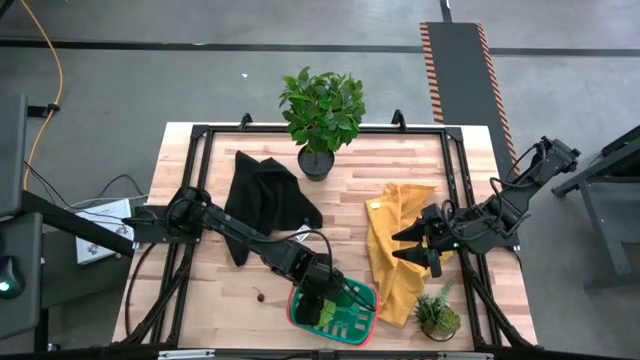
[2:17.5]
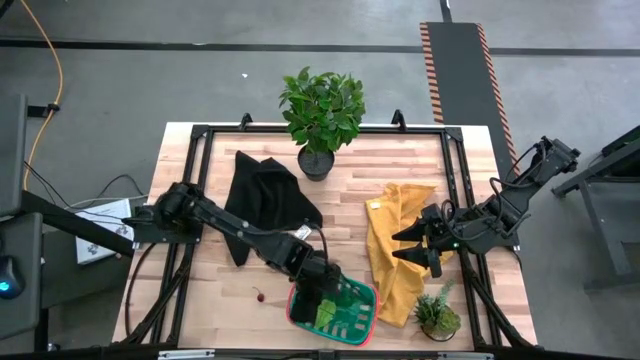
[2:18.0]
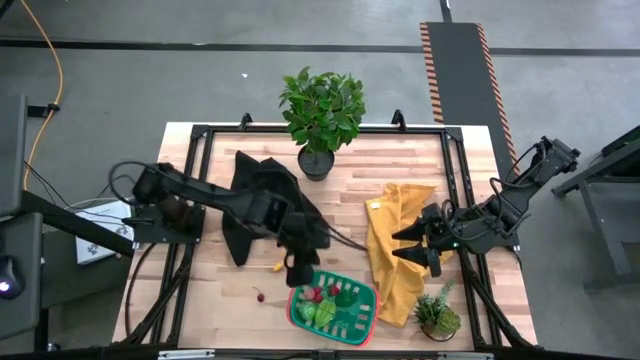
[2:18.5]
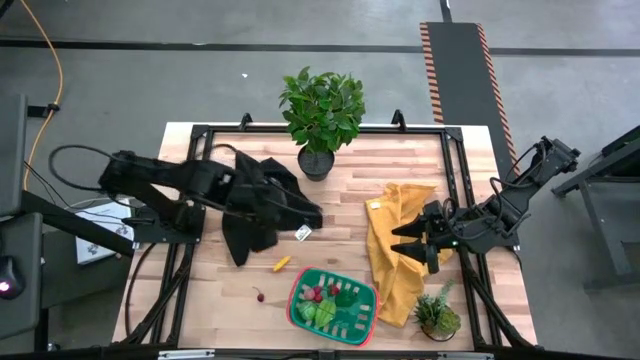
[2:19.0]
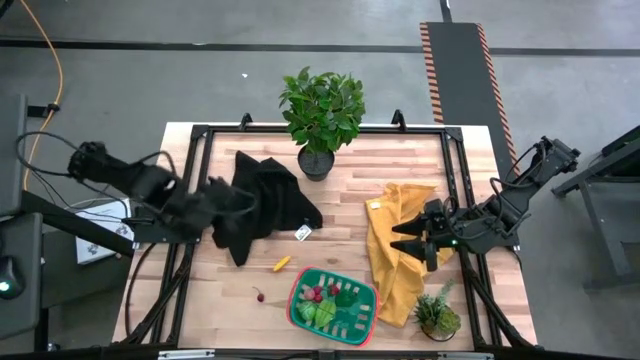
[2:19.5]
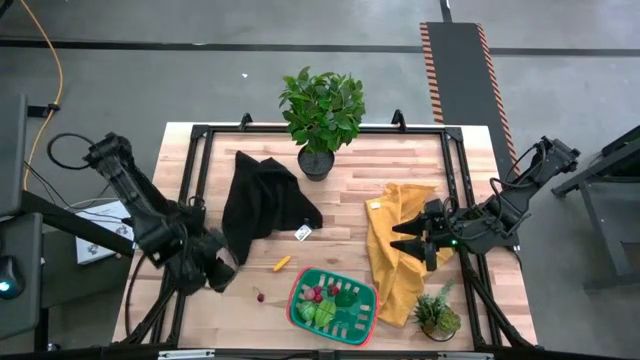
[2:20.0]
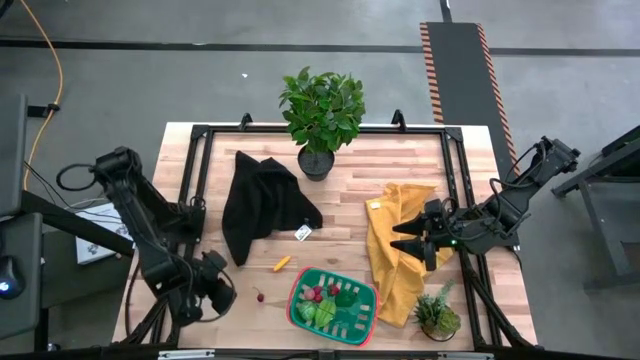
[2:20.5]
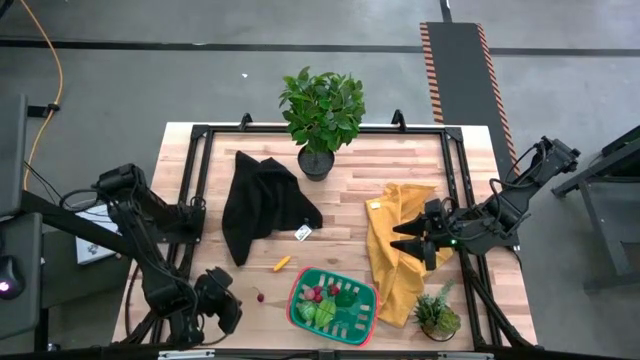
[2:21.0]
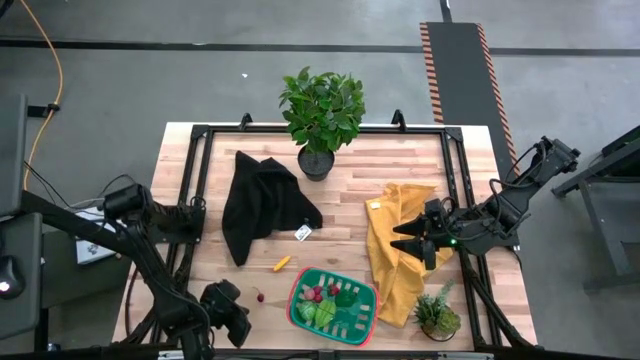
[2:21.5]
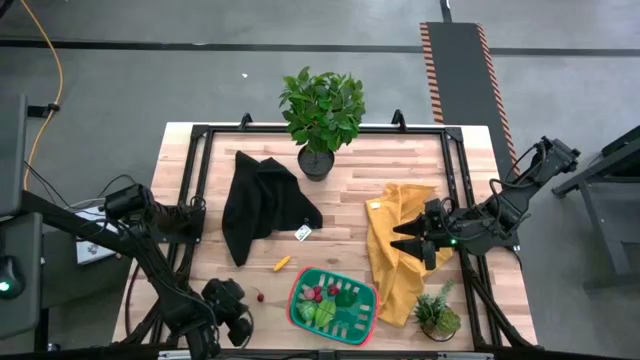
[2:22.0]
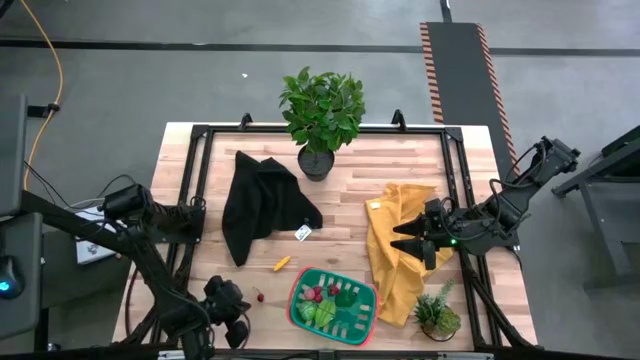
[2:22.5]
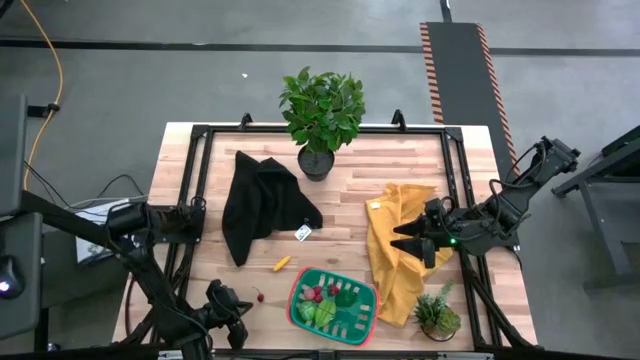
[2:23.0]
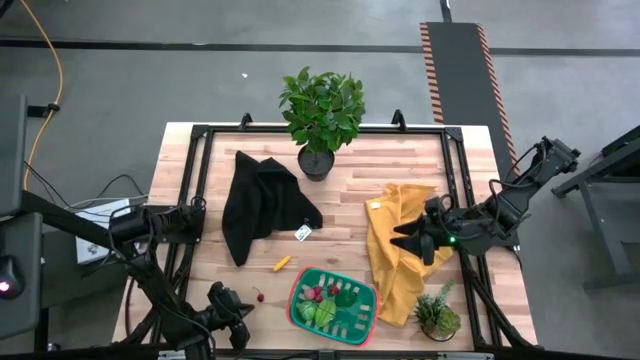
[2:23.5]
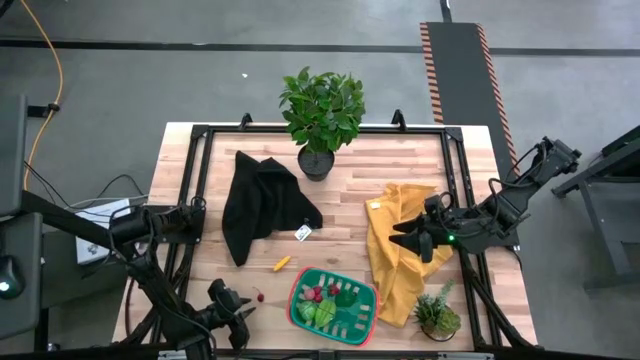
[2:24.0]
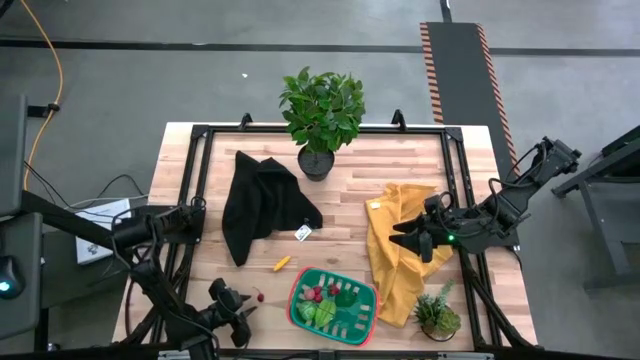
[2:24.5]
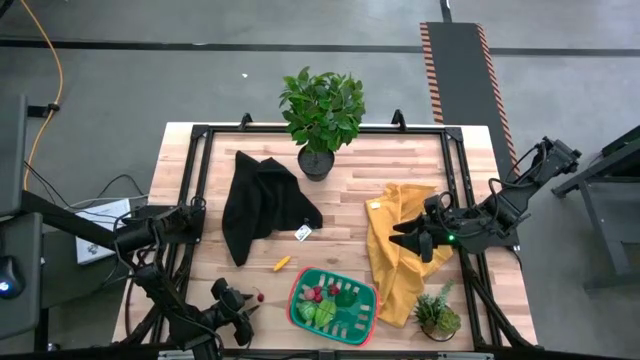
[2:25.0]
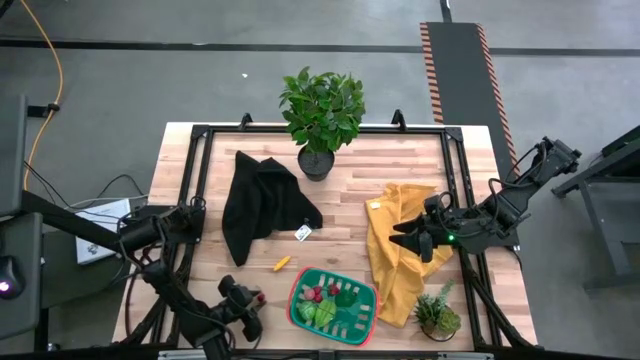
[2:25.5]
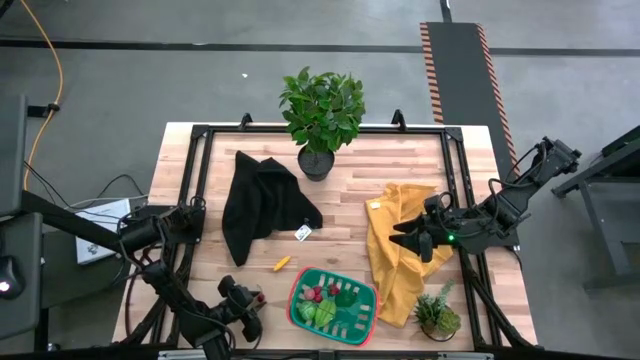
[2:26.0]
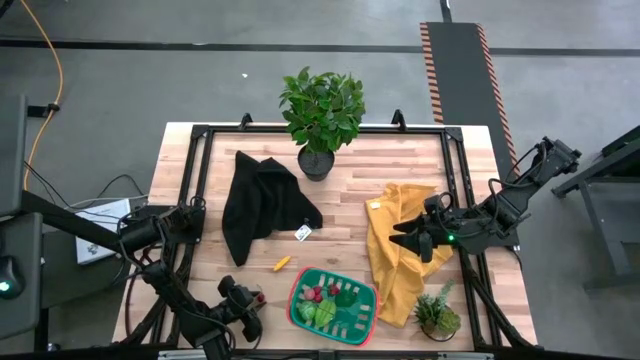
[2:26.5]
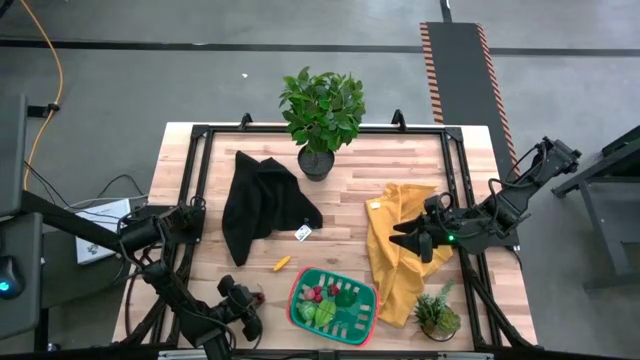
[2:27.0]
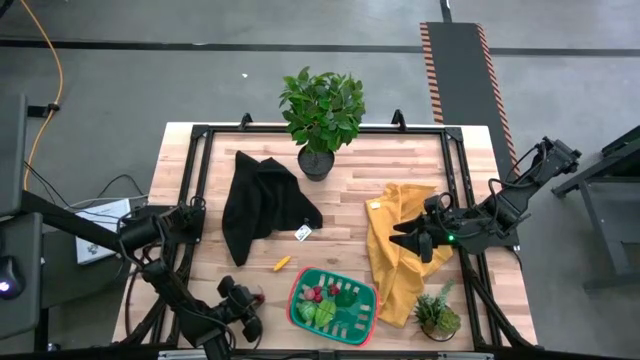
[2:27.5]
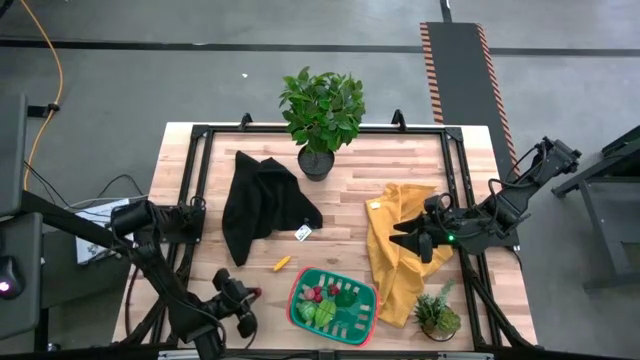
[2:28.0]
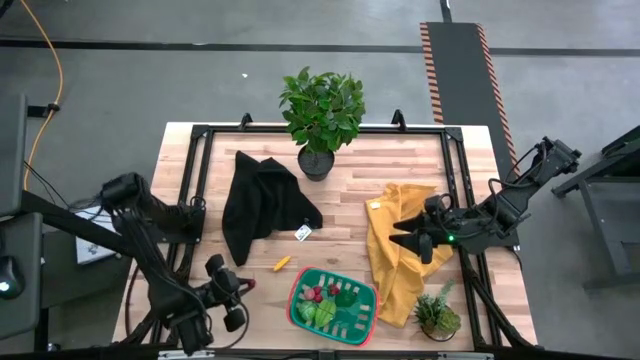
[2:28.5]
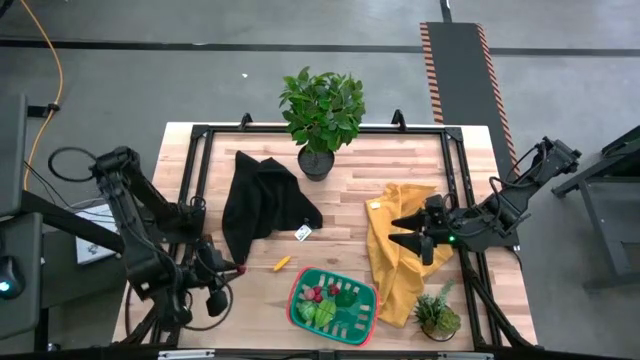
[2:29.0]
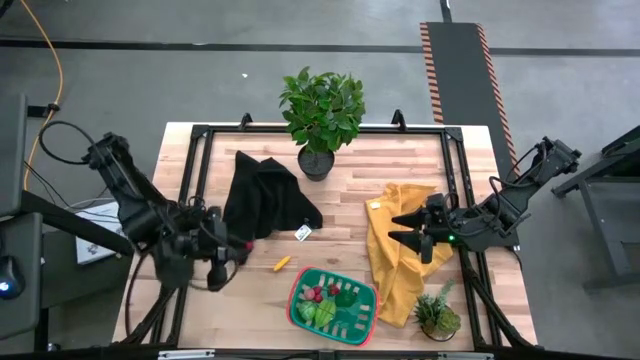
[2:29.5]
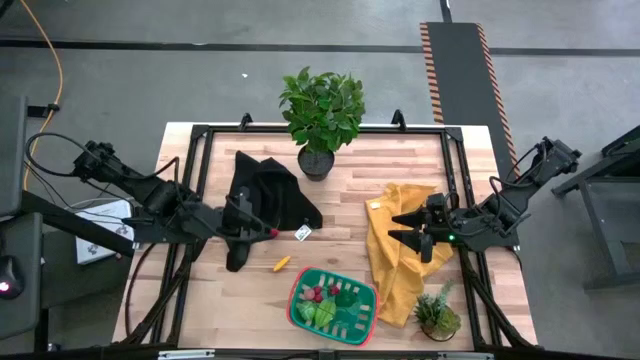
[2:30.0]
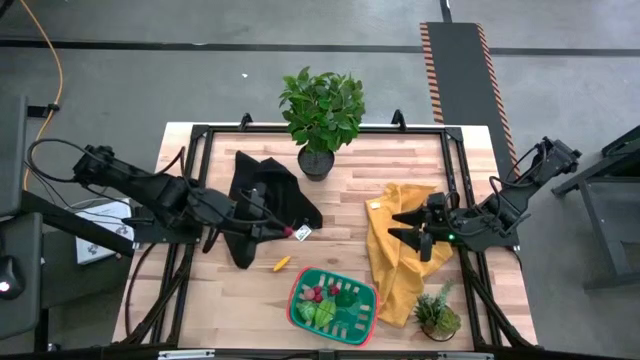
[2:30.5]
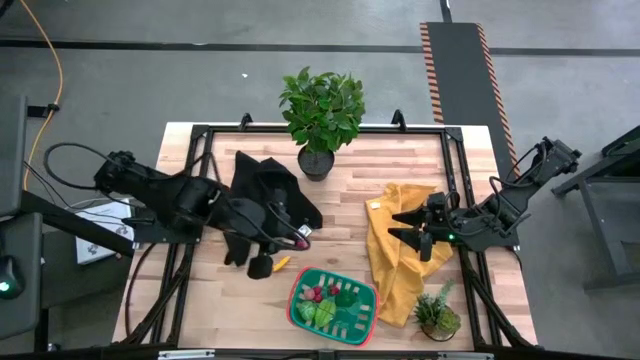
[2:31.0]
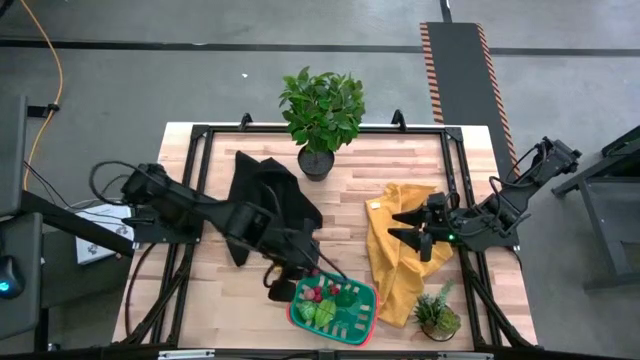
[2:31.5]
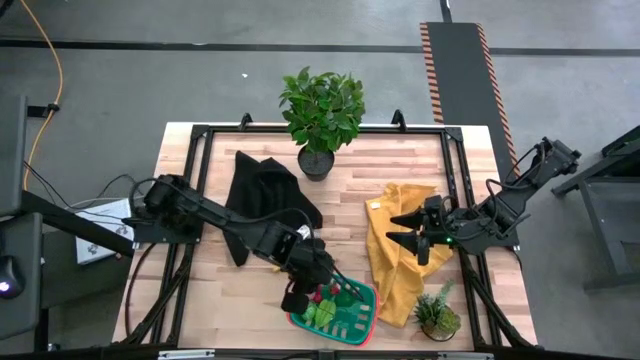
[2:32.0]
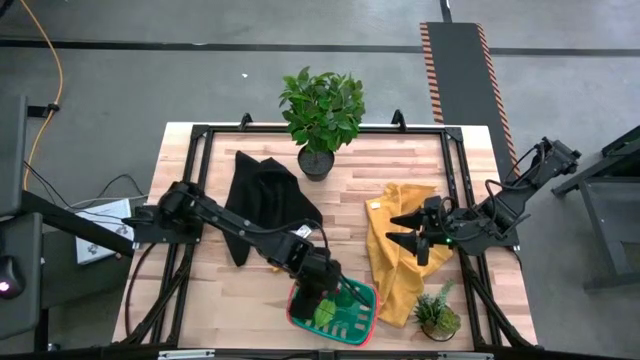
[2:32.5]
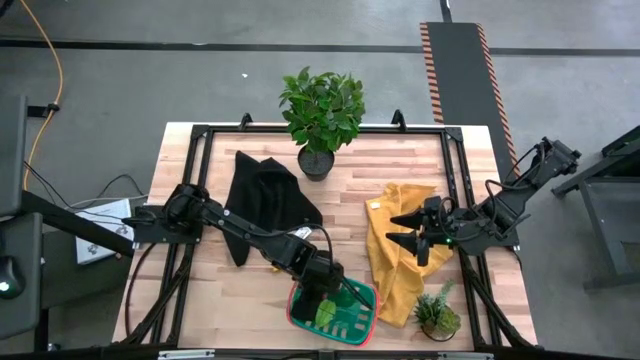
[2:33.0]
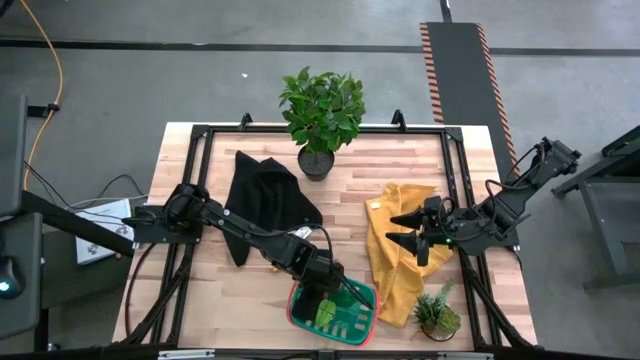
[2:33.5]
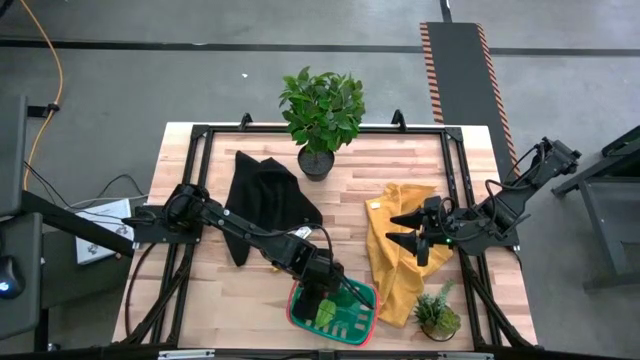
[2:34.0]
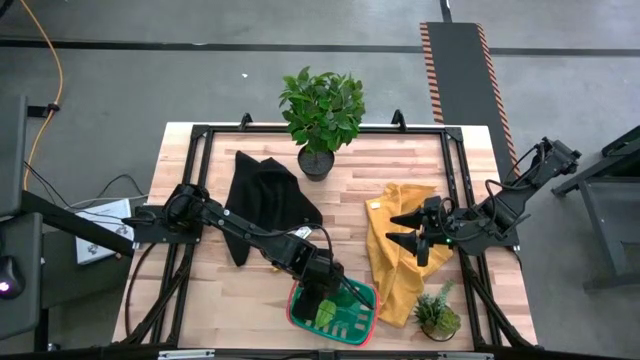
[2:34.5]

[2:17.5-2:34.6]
Task: Pick and placing Produce into tupperware
Put the red cherry into the blue bin

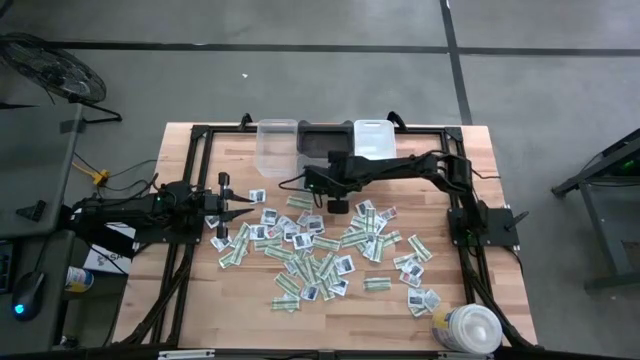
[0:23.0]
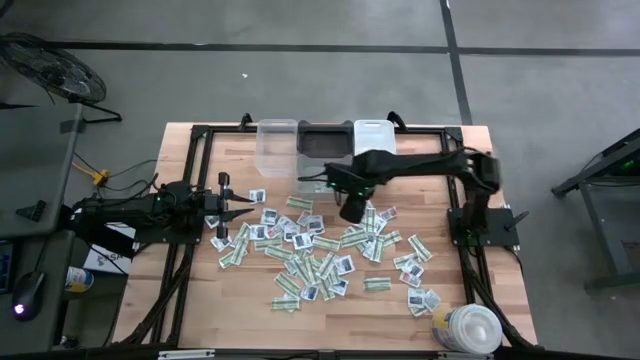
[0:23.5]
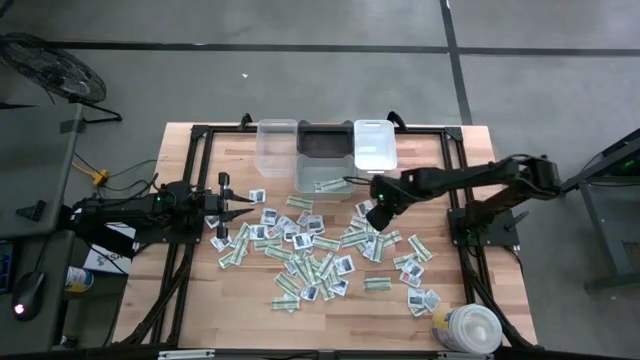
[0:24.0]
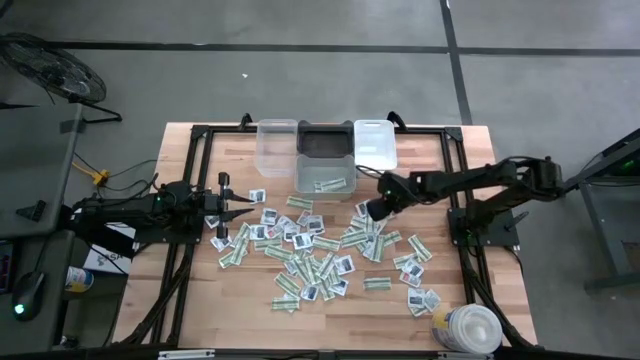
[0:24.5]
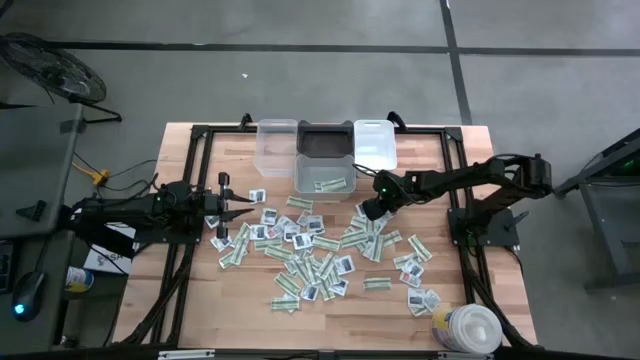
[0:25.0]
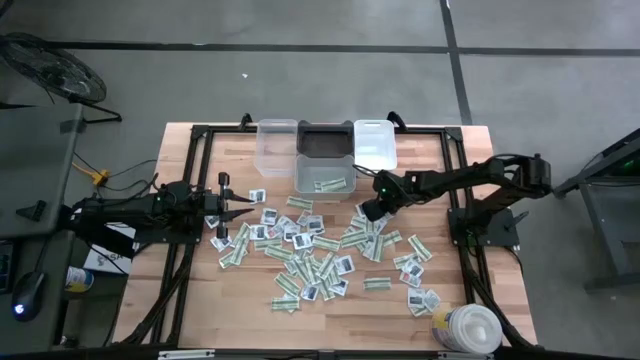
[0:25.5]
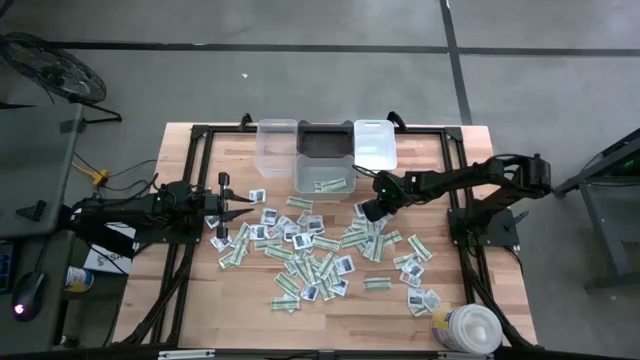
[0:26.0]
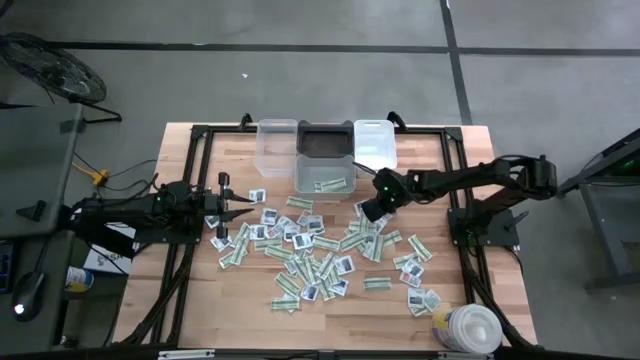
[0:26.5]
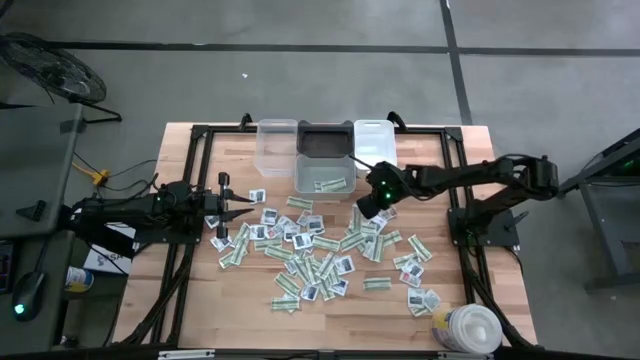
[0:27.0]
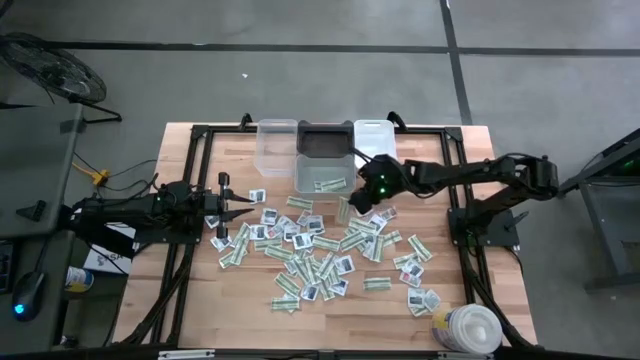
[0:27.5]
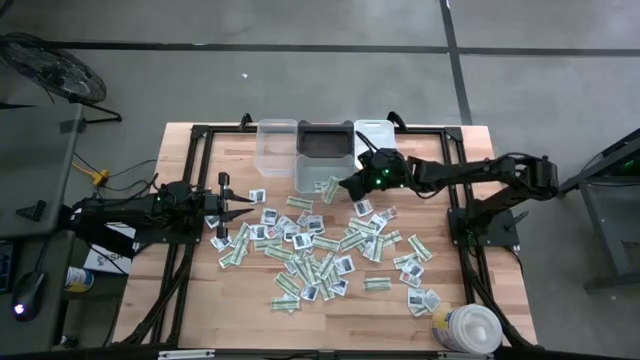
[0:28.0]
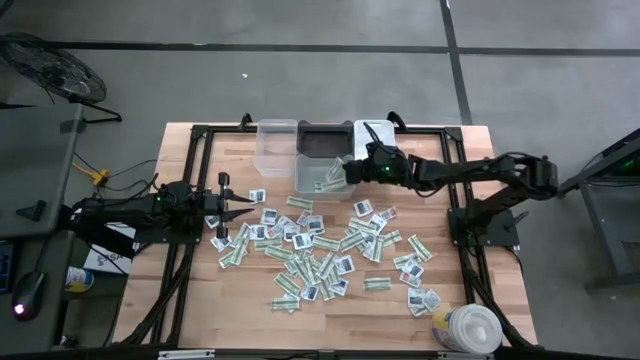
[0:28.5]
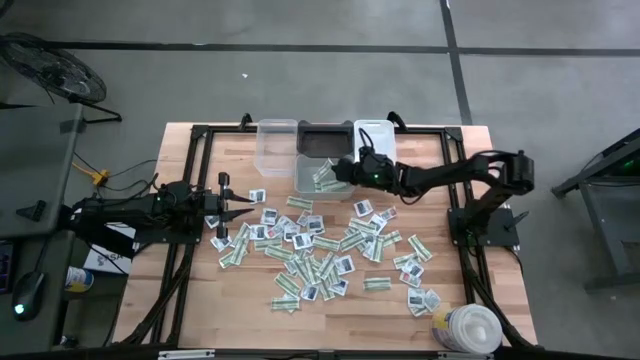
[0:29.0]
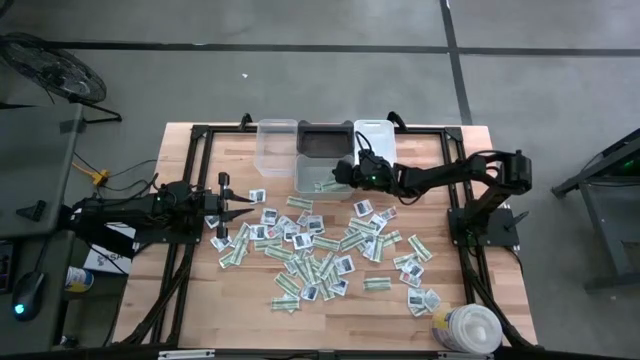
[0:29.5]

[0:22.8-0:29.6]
Task: Pick & Place First Aid Supplies
Put the bandage pack into the gray bin
